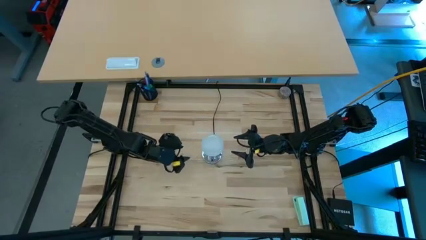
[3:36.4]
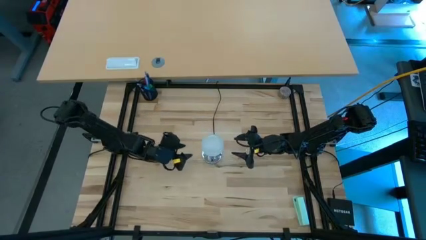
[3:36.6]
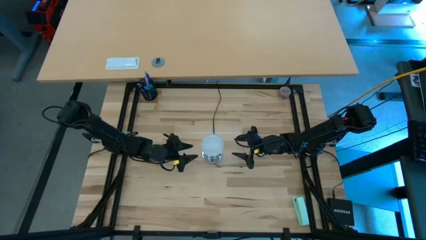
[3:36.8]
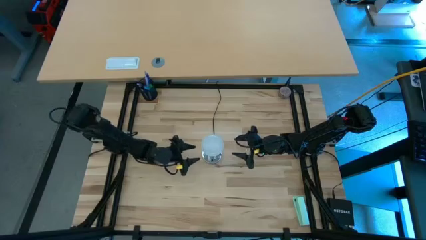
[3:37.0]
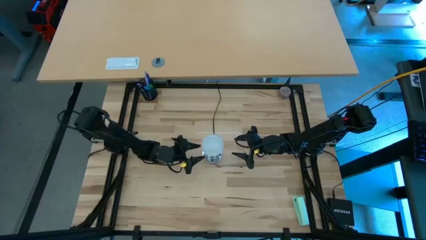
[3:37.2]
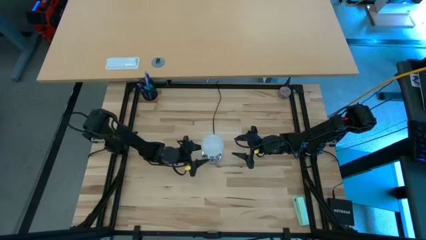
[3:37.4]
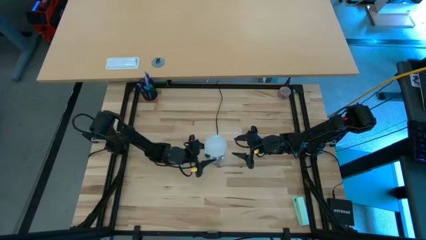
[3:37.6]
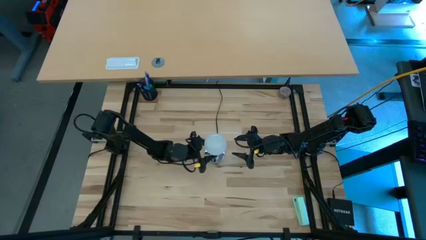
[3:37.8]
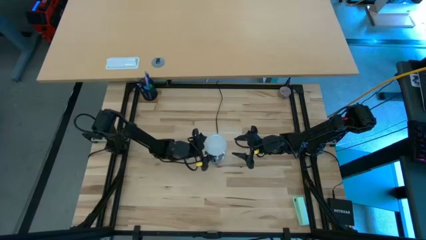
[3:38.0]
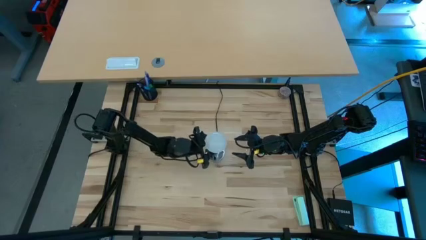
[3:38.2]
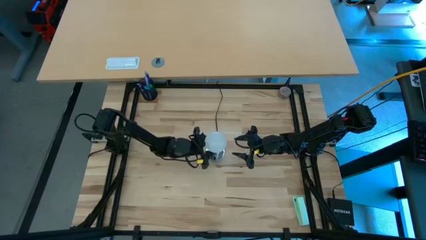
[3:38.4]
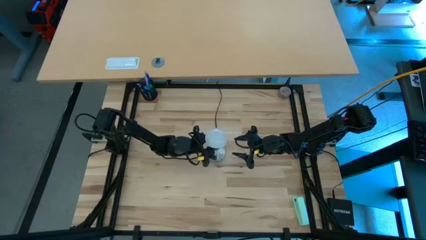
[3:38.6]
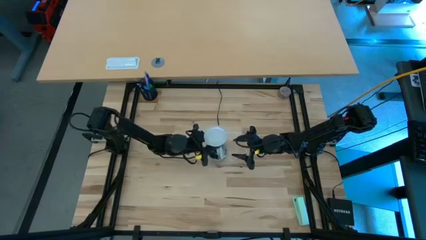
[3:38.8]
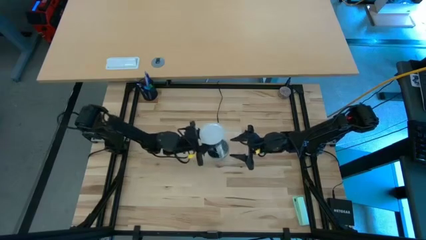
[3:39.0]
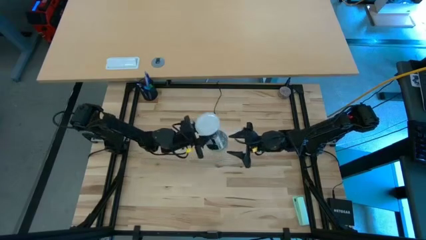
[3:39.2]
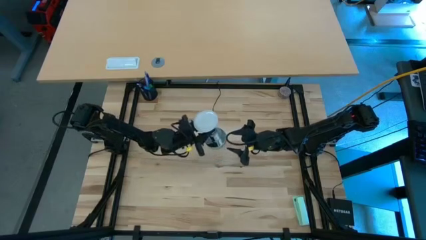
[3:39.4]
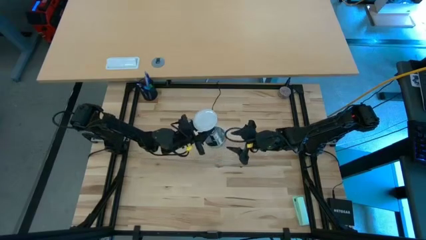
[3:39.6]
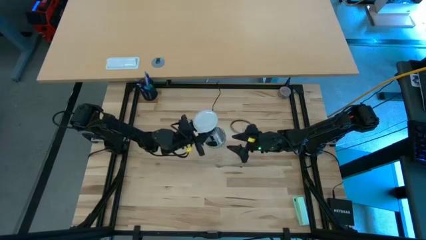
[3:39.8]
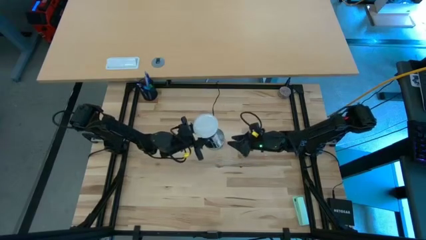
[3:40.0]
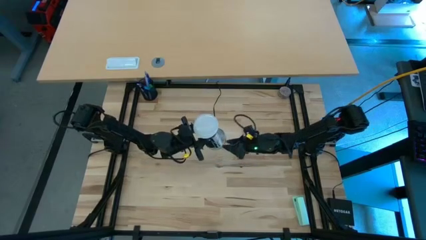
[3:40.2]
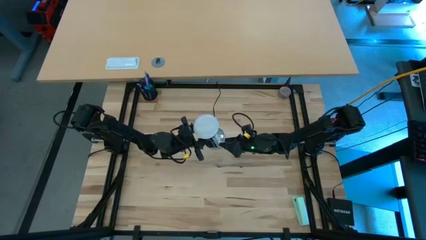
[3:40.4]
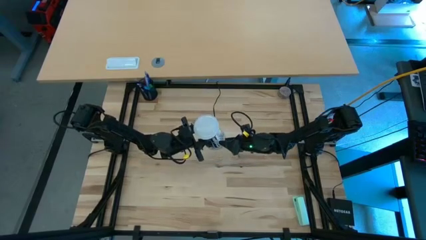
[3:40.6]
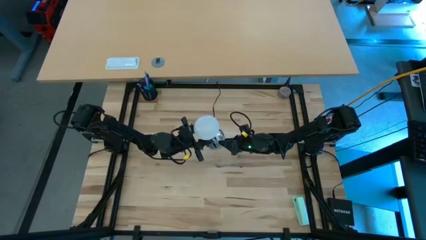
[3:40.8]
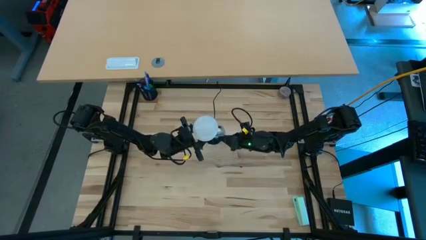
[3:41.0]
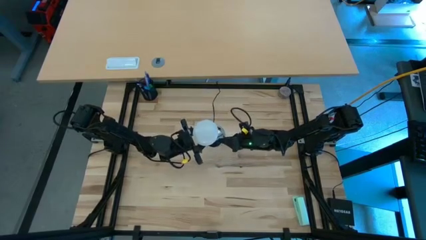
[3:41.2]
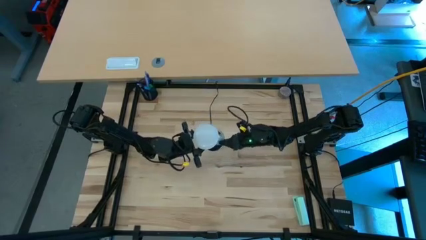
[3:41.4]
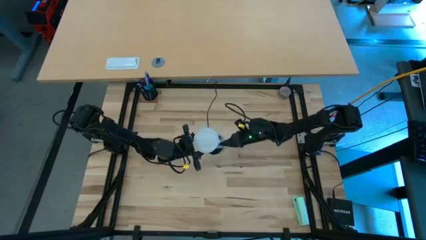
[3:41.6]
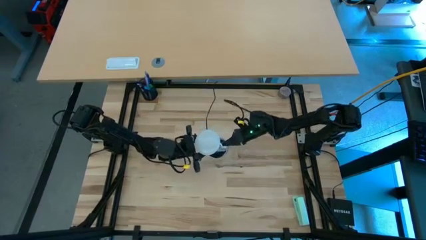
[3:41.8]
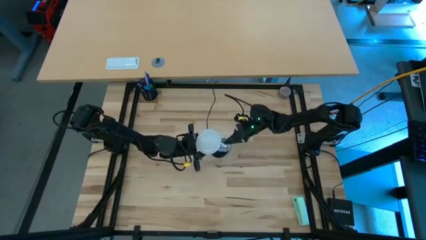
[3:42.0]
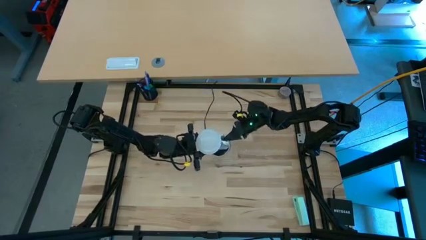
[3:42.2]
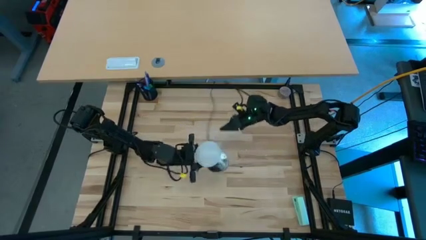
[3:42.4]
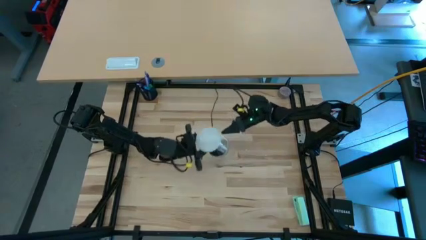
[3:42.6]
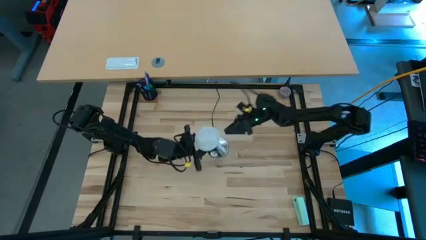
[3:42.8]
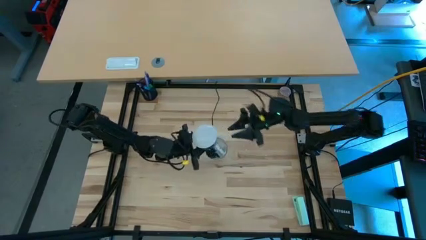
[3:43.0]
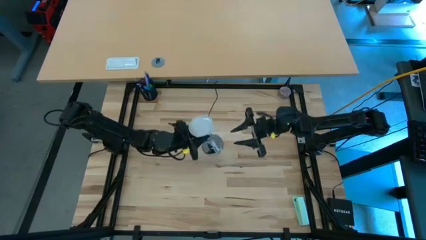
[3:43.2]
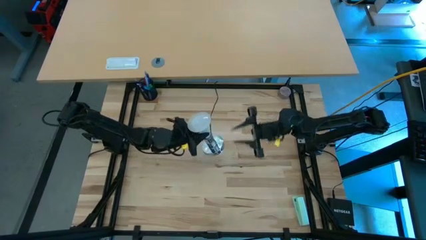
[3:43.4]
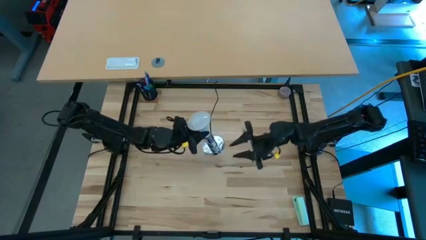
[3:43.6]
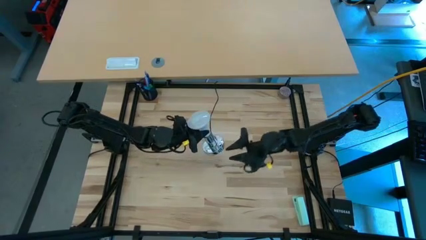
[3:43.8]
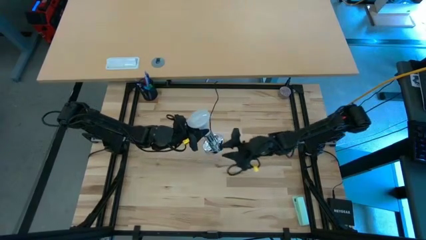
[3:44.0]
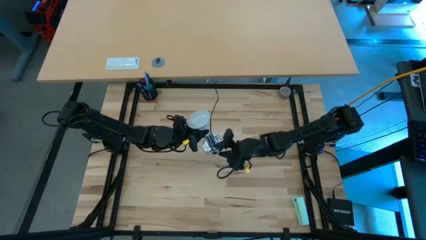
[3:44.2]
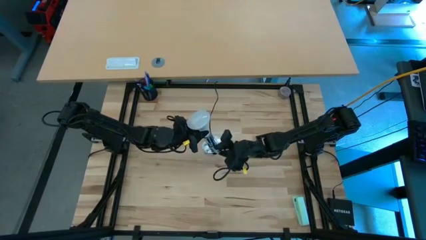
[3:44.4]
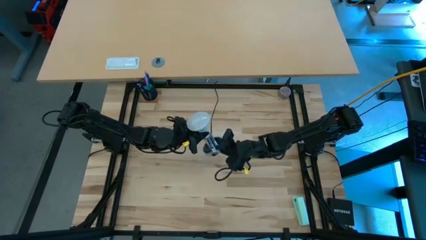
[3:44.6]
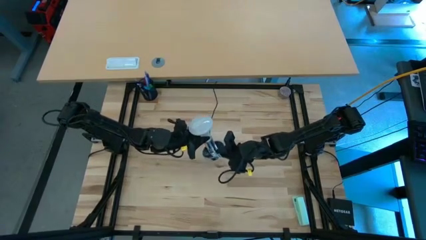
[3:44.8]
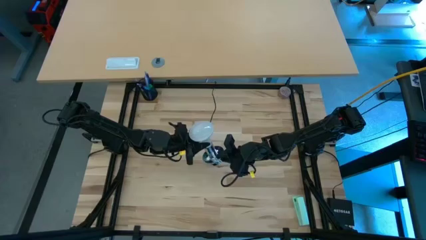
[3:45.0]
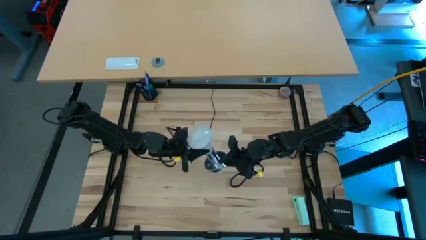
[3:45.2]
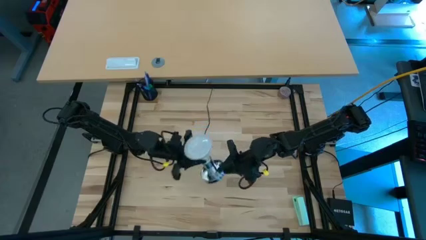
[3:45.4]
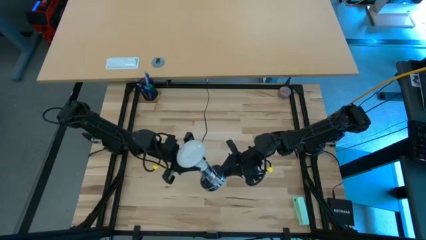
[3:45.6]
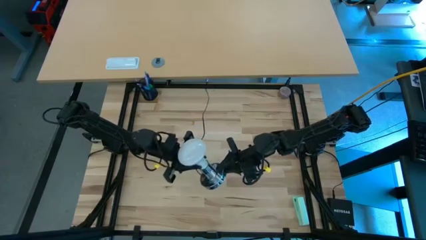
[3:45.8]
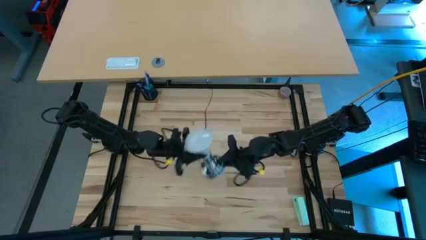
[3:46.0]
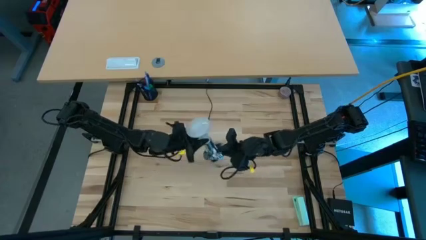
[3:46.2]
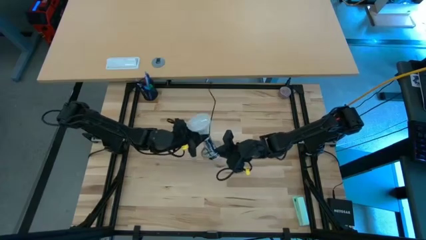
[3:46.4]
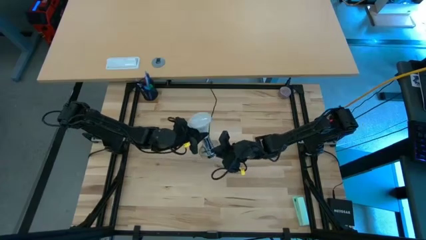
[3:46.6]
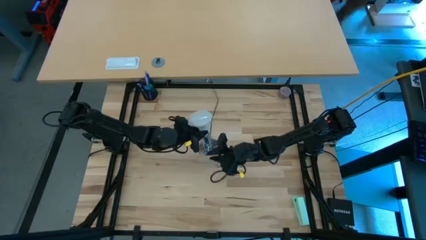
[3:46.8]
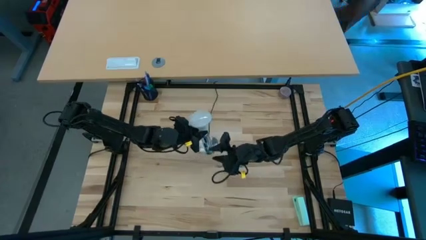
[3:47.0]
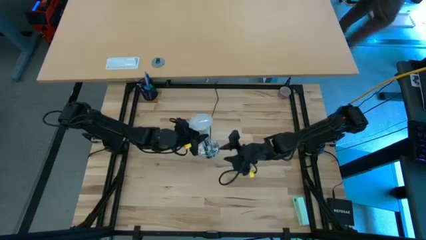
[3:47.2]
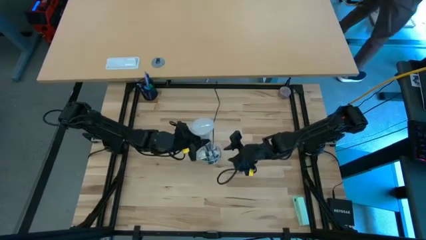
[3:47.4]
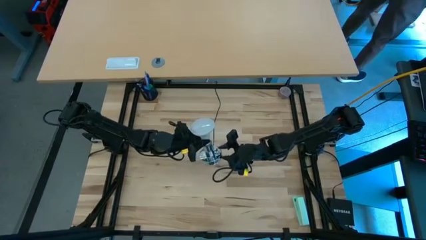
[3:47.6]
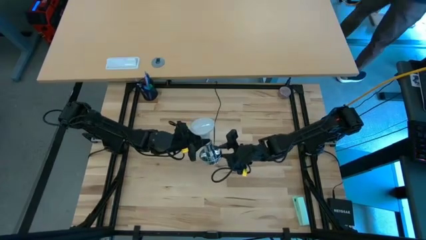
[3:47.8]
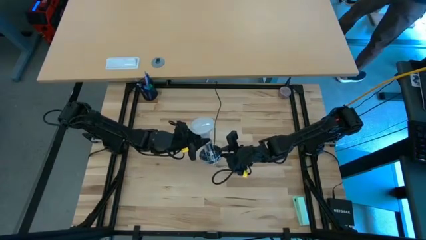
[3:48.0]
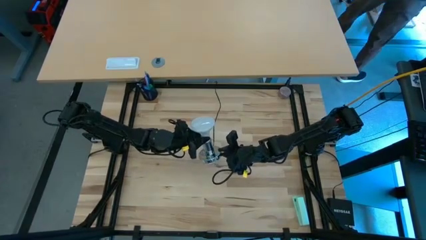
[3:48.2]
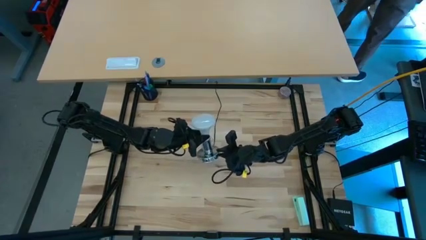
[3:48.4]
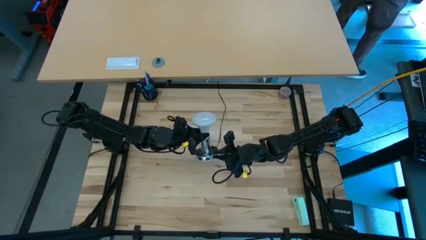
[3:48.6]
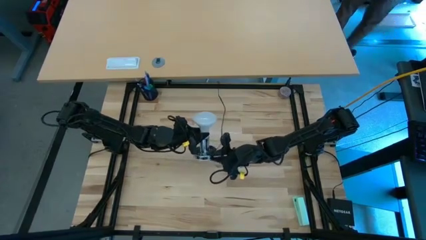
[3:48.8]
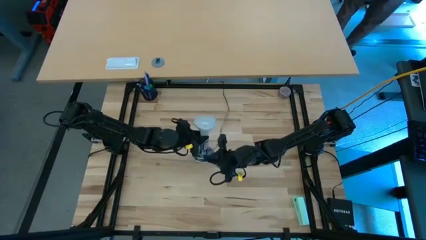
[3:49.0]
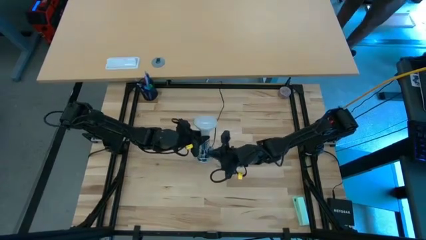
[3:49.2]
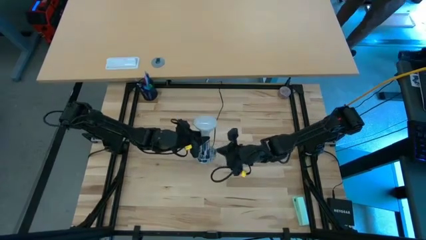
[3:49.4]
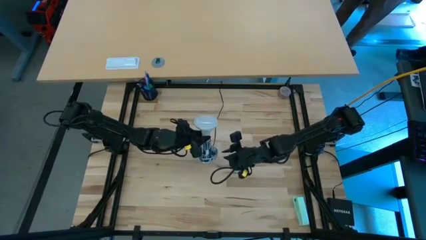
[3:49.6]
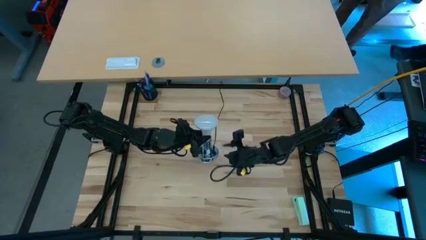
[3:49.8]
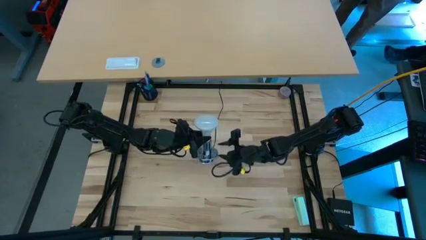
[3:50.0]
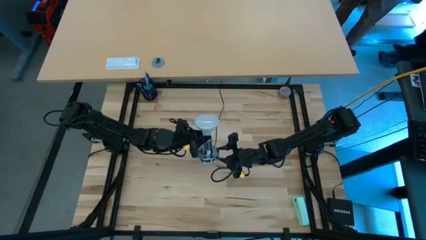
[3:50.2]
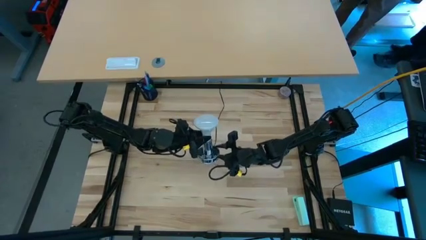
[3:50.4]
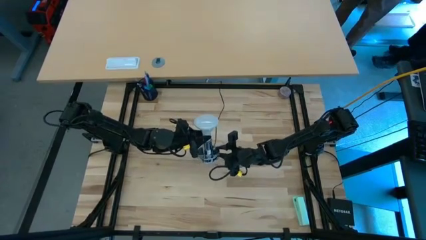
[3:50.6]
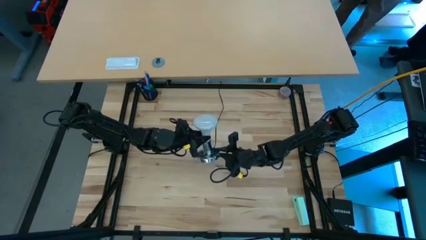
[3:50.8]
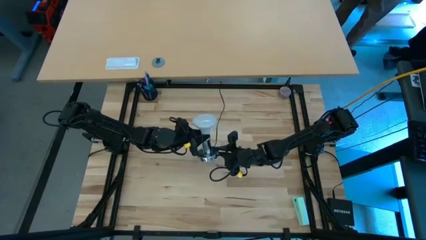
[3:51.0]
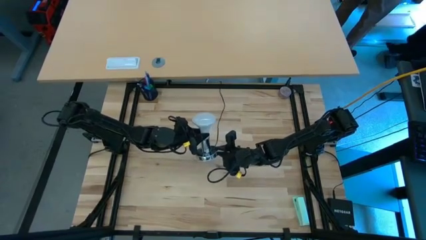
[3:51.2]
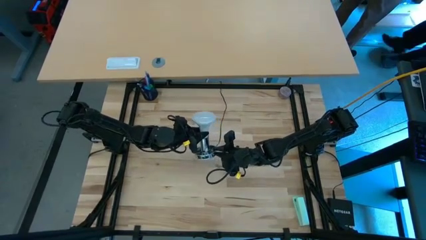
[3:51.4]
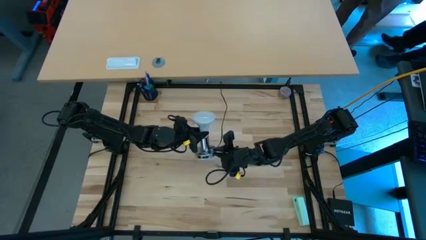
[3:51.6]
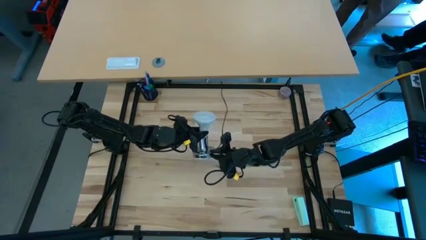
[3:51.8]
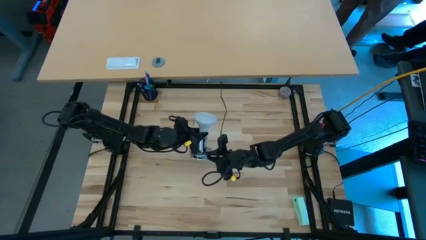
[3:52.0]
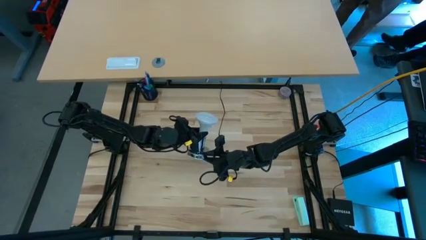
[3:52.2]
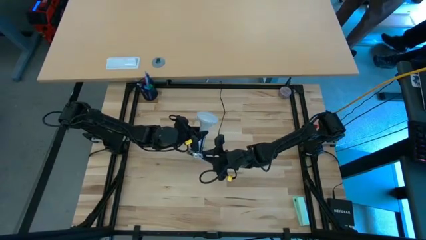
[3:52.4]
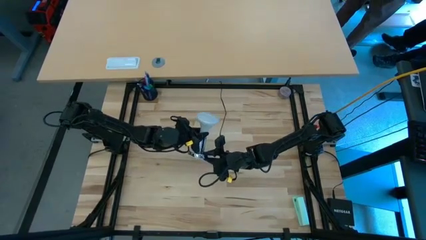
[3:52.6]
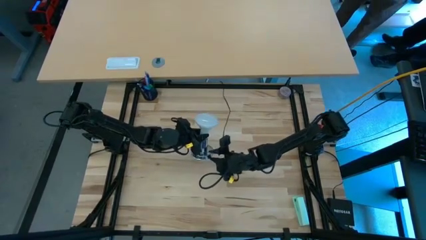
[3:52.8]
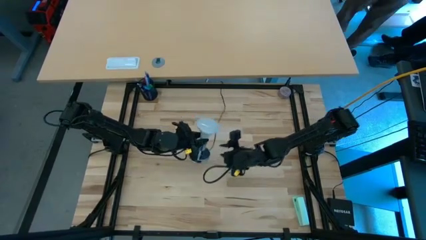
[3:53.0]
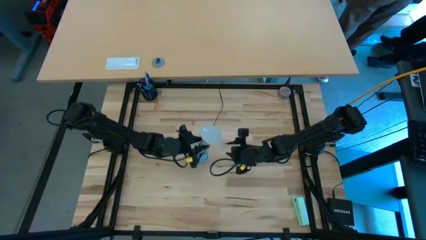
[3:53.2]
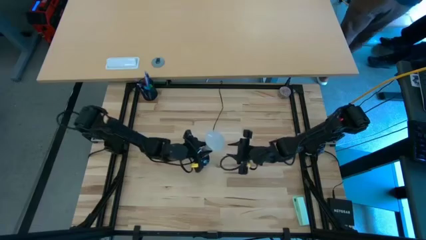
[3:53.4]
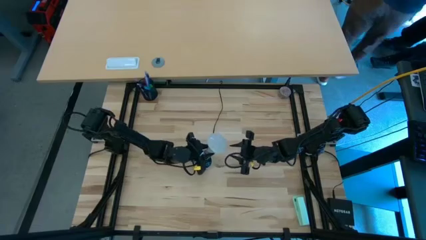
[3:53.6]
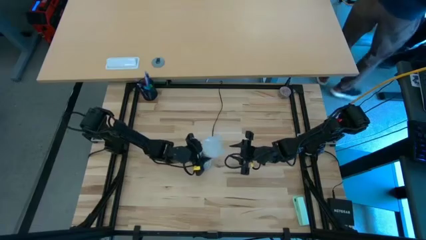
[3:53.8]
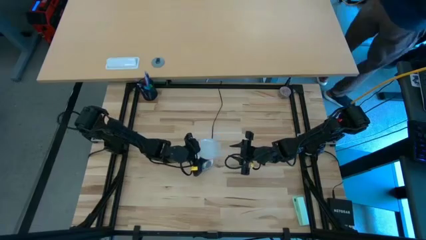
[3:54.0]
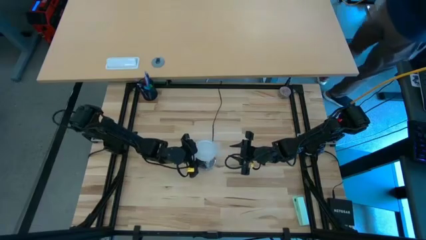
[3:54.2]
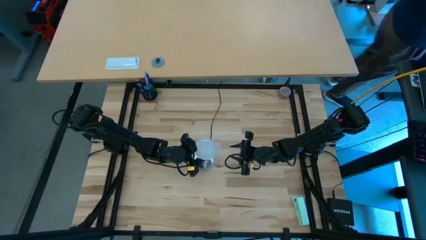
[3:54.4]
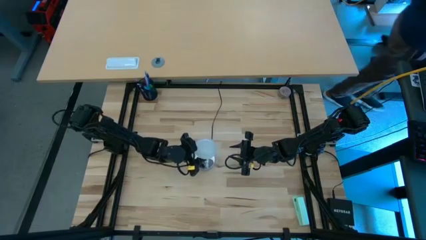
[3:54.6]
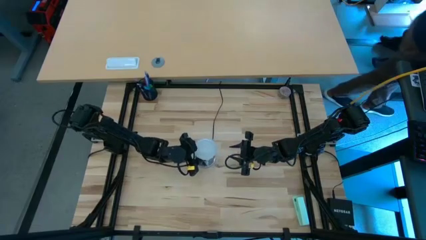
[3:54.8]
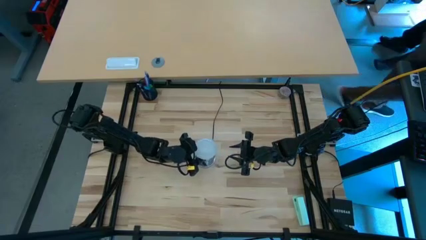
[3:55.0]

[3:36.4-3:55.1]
Task: Screw lightbulb
Remove the lightbulb from the lamp
